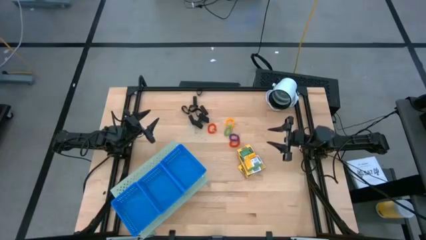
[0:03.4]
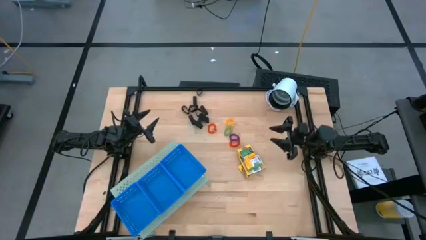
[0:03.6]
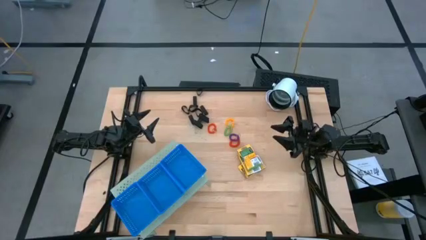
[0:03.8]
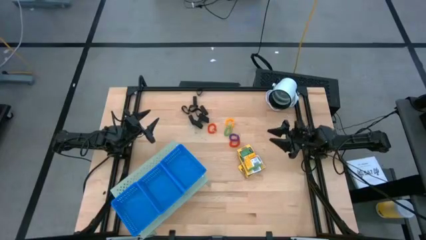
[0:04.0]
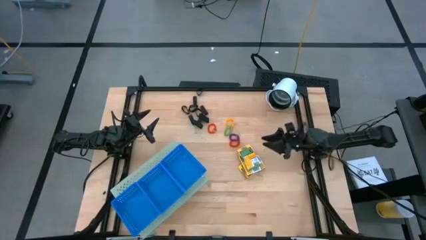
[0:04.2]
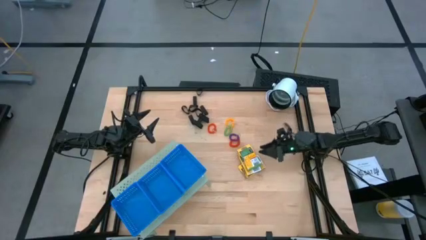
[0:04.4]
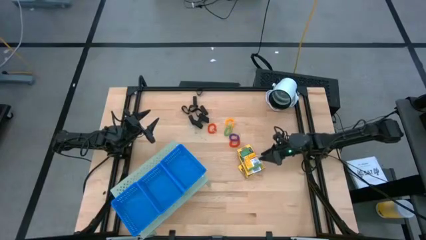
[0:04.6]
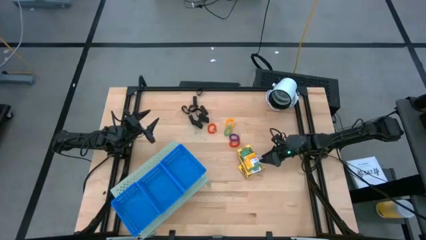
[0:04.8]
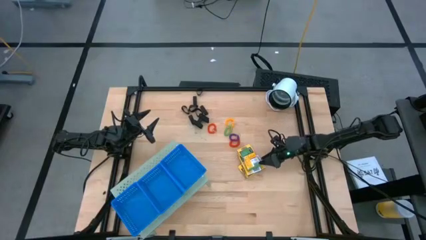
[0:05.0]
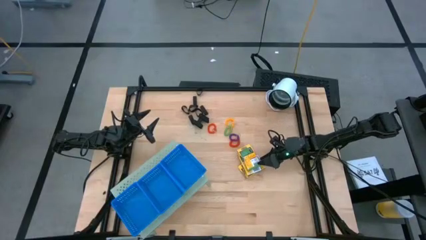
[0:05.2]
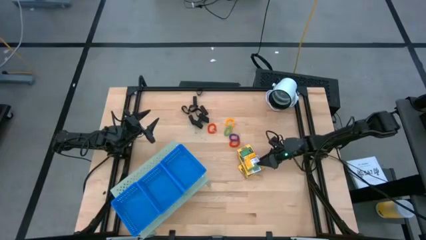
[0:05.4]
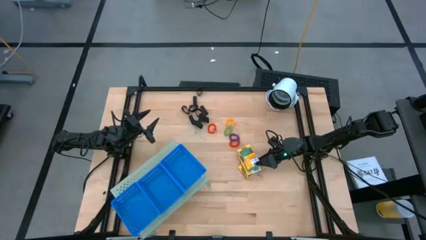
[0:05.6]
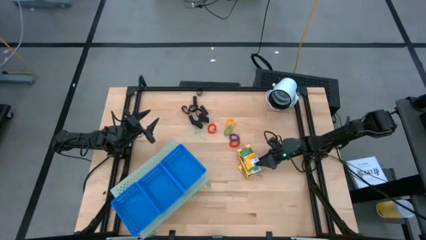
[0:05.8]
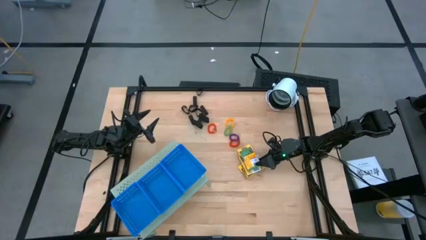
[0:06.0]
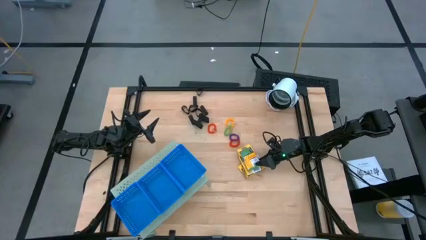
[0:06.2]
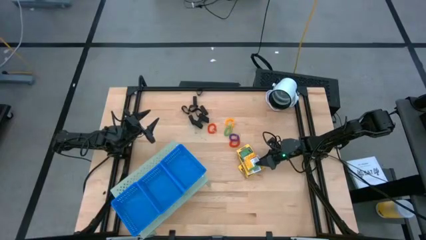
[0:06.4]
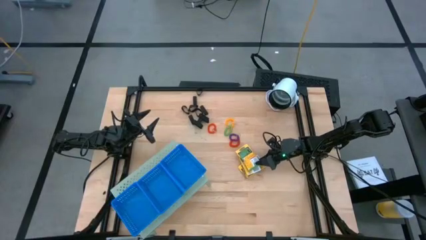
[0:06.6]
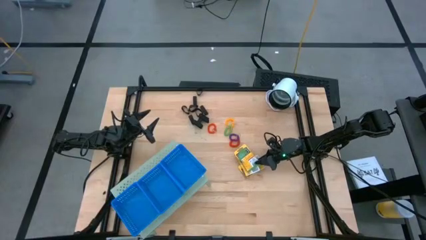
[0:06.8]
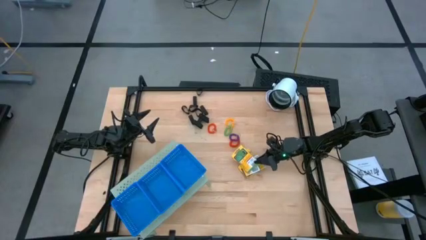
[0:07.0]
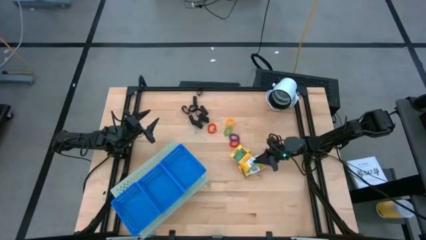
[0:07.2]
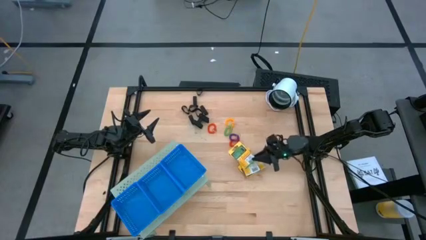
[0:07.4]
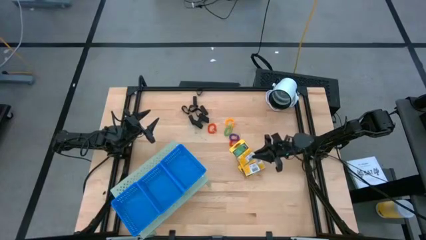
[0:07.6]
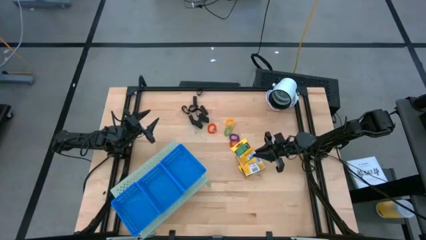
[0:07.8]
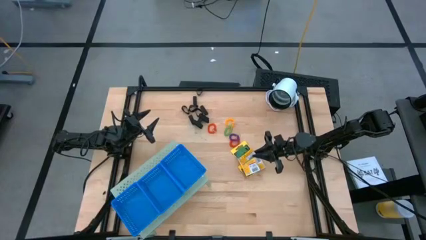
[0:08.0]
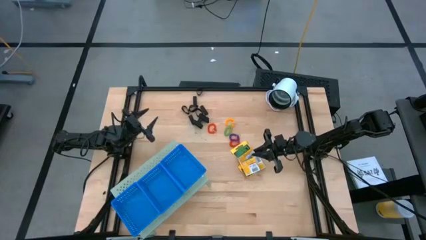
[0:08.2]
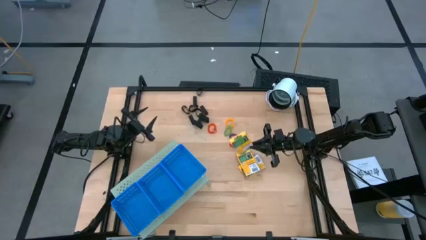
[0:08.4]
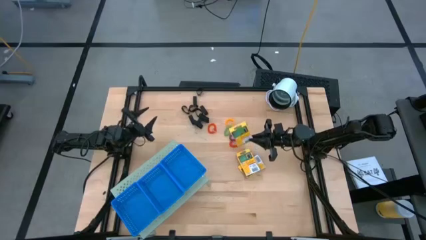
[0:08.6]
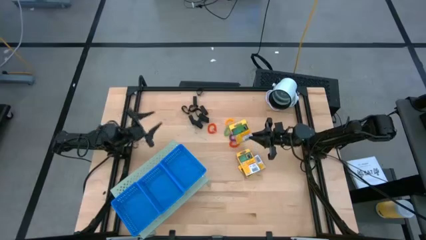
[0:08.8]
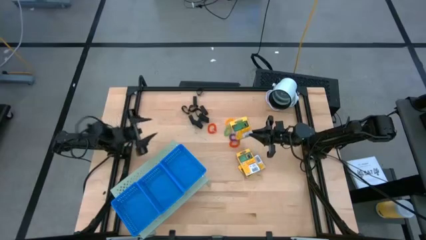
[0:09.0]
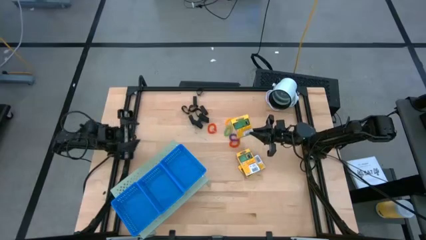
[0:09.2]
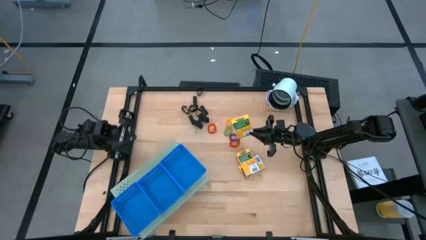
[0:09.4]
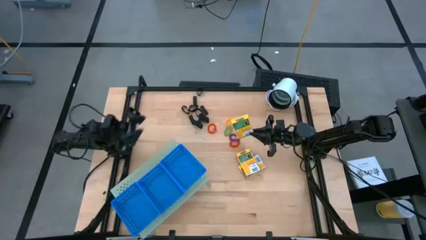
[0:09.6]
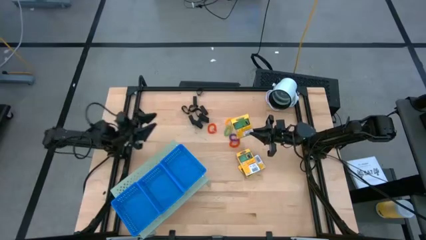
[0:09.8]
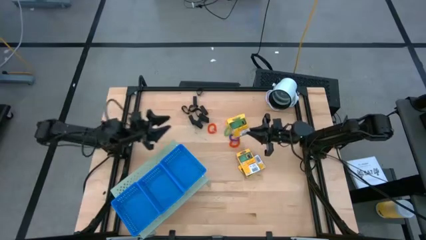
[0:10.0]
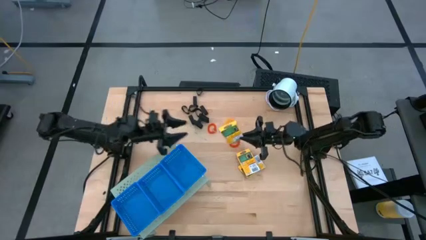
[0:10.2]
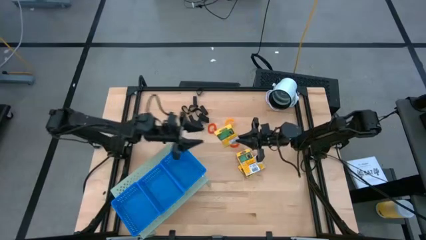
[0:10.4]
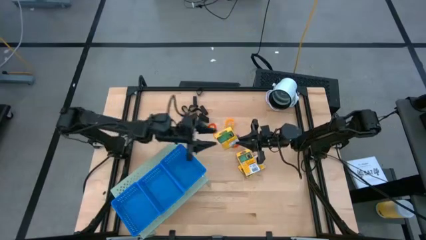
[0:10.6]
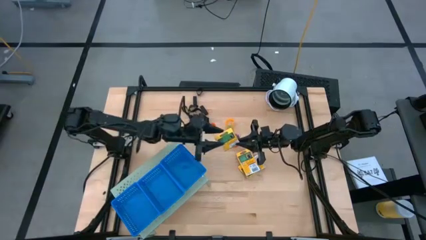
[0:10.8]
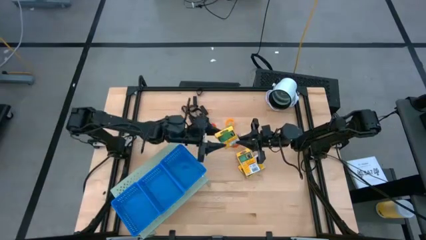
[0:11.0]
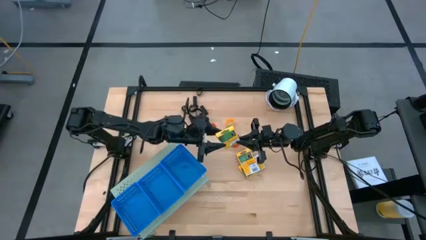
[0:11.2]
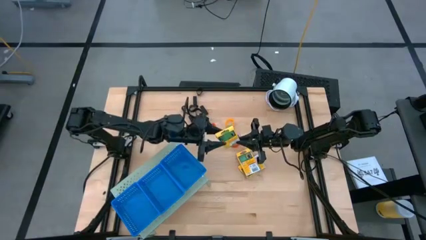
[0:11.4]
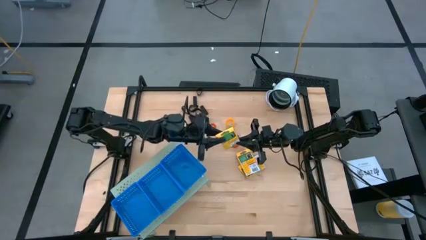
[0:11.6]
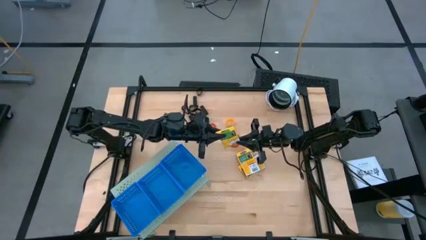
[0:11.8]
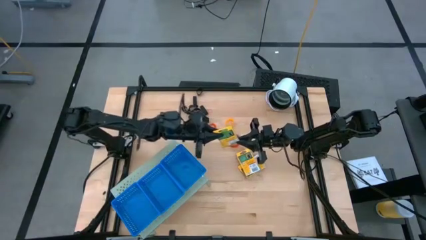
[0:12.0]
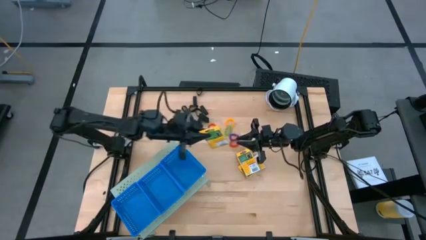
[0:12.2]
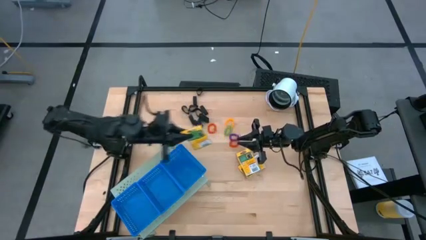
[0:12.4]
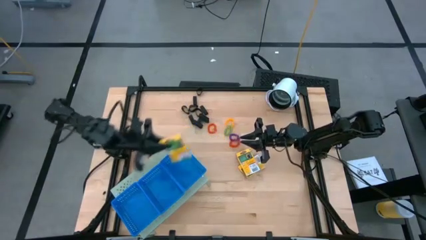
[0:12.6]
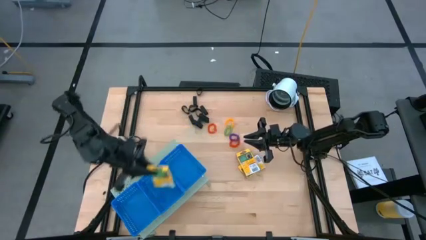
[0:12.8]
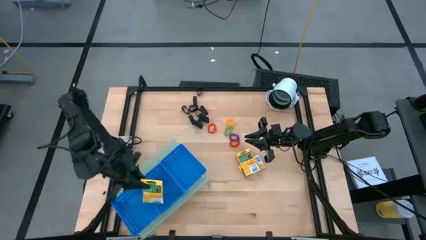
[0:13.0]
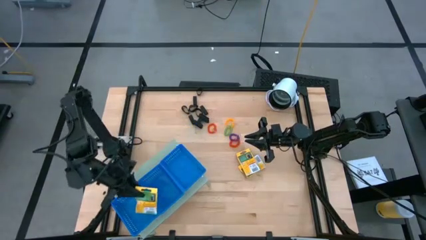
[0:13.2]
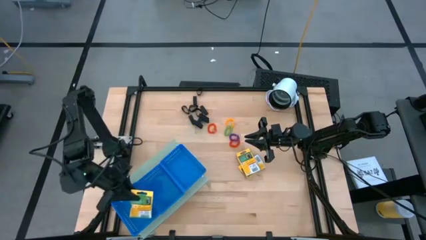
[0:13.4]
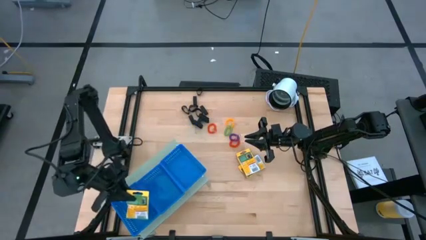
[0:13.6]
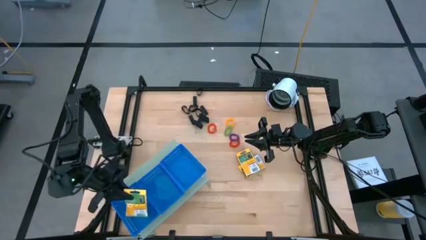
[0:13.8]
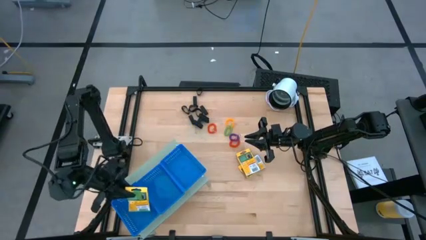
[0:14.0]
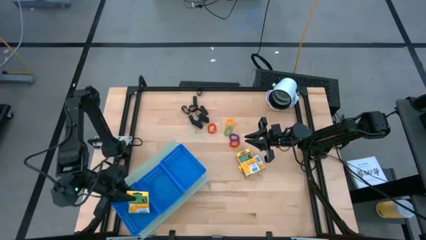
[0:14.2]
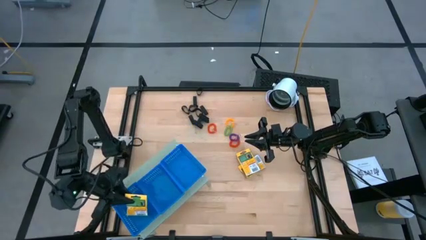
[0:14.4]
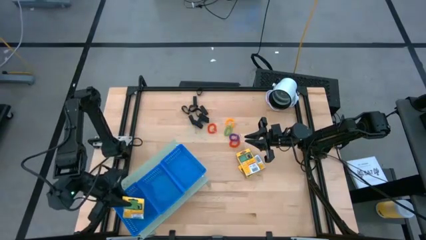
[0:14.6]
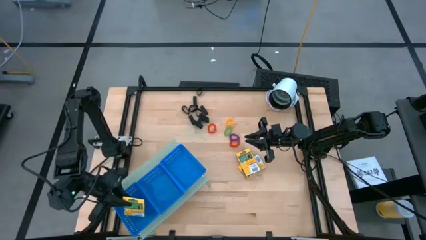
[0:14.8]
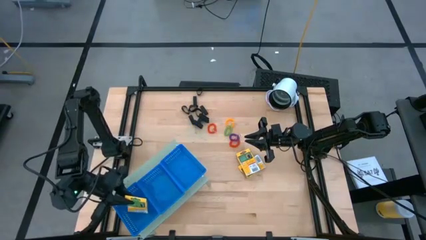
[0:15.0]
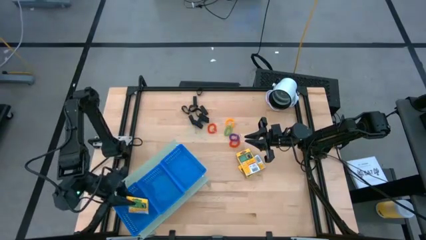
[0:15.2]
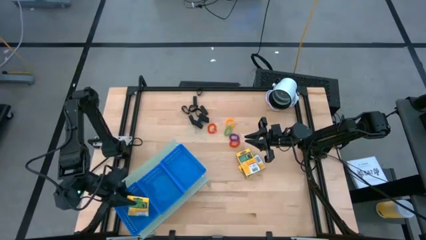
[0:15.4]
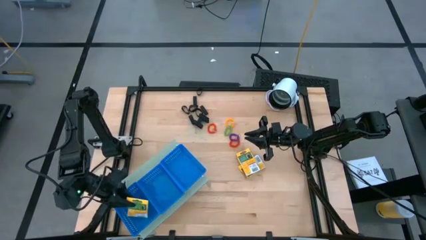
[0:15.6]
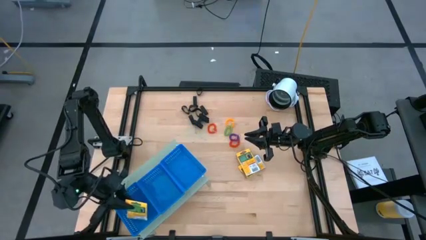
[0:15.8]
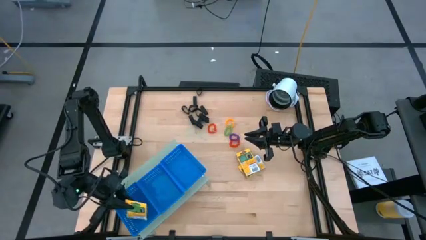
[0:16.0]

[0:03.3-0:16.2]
Task: Pick & Place Office Desk Supplies
Put the yellow crayon box into the bottom blue basket on the shelf
